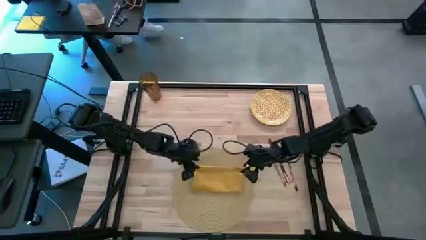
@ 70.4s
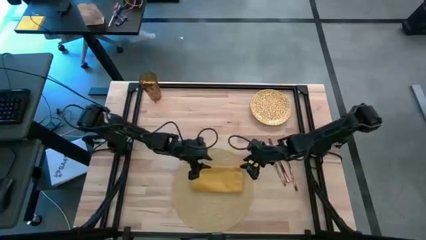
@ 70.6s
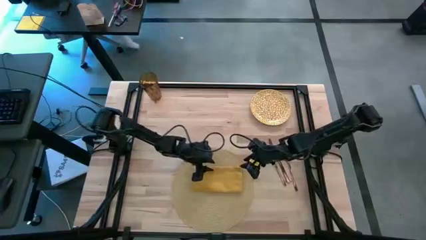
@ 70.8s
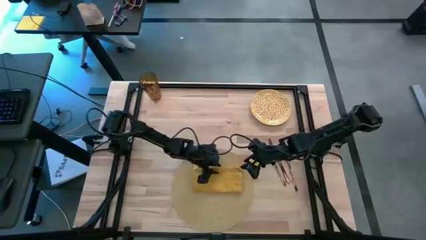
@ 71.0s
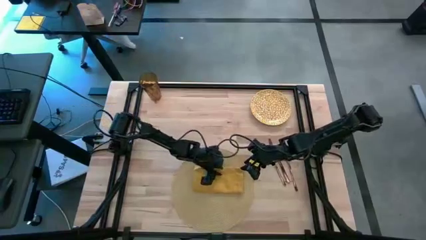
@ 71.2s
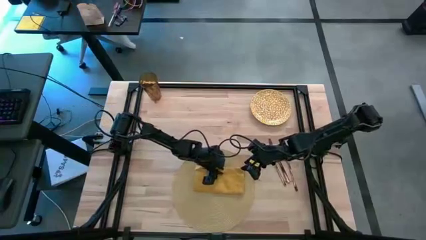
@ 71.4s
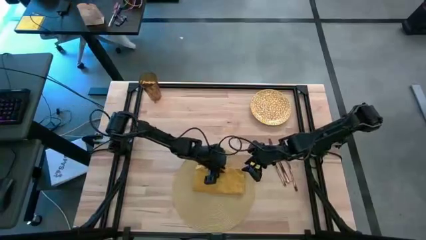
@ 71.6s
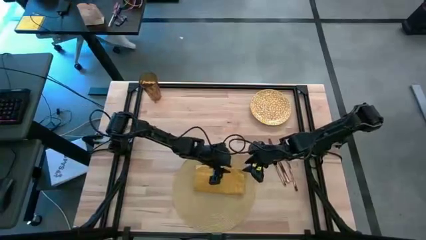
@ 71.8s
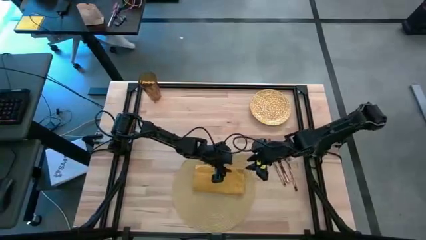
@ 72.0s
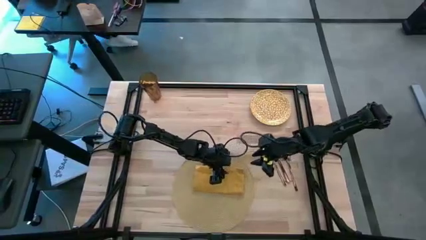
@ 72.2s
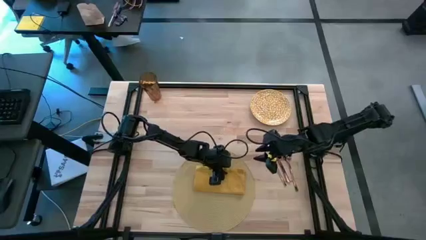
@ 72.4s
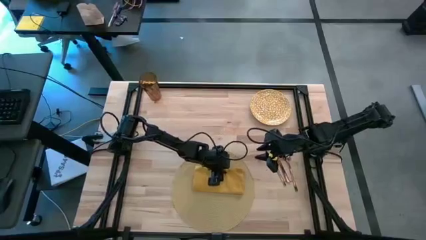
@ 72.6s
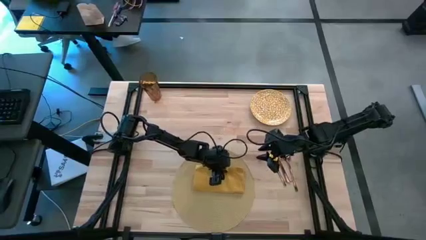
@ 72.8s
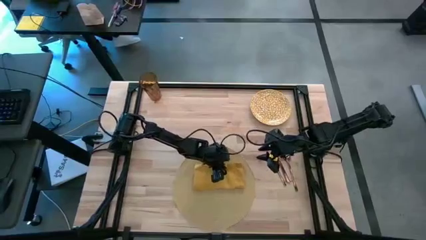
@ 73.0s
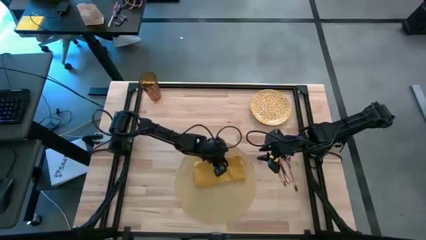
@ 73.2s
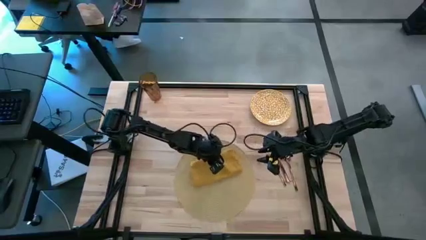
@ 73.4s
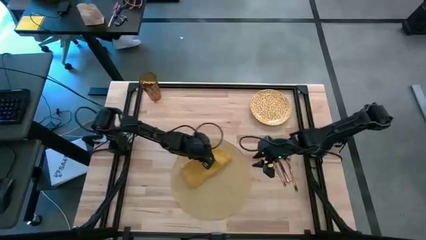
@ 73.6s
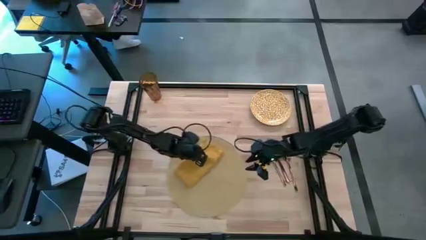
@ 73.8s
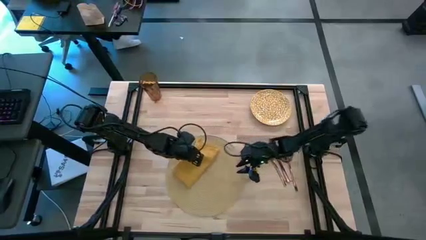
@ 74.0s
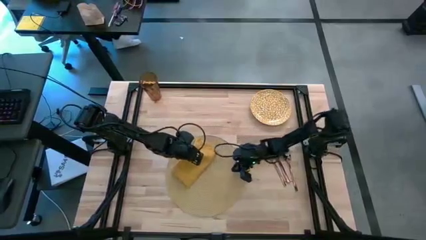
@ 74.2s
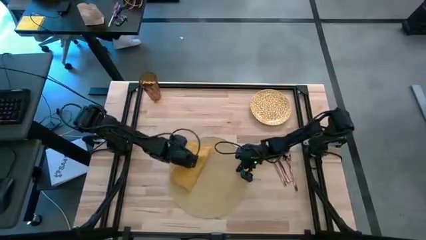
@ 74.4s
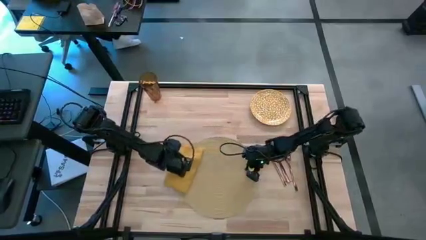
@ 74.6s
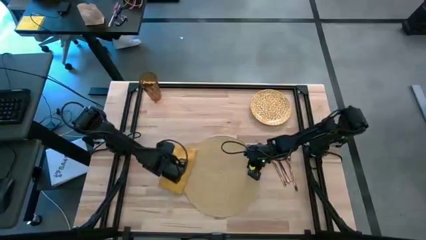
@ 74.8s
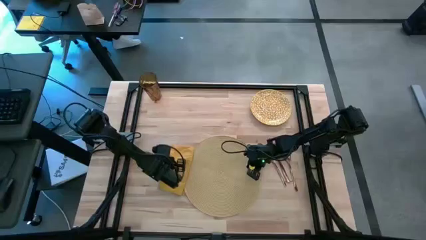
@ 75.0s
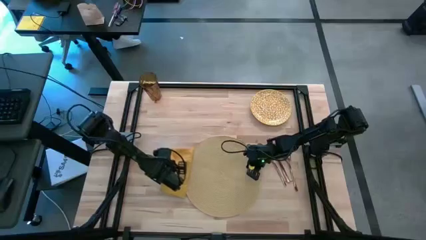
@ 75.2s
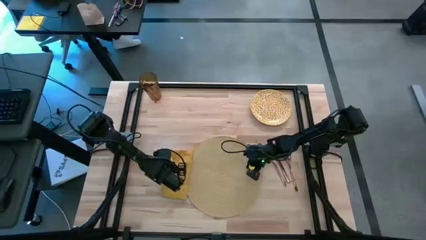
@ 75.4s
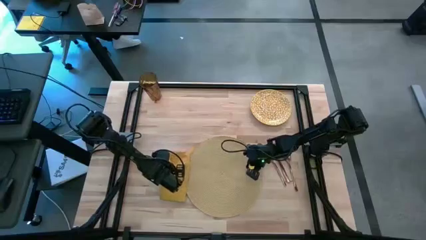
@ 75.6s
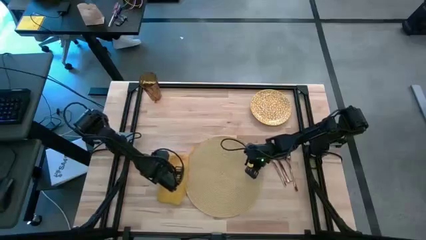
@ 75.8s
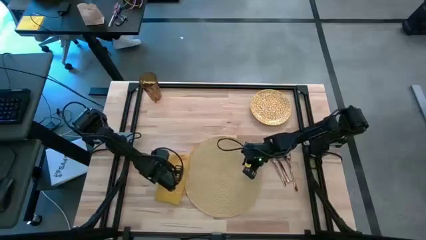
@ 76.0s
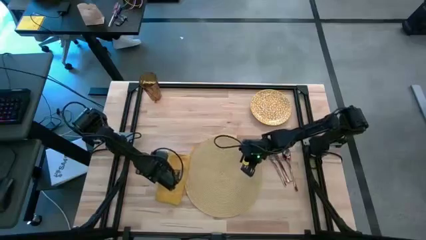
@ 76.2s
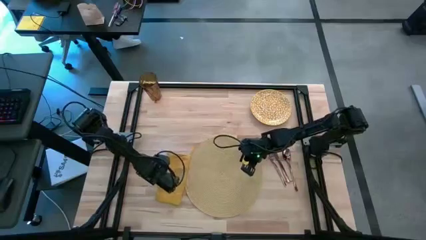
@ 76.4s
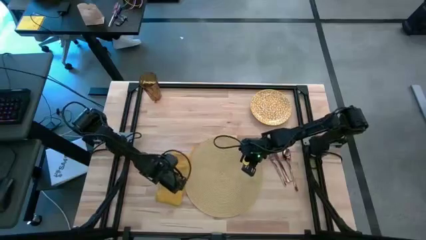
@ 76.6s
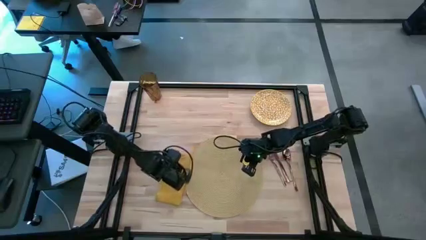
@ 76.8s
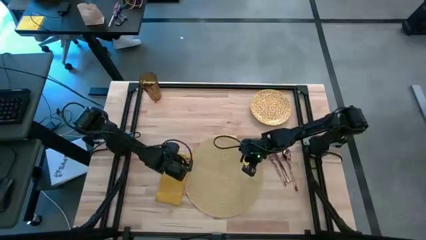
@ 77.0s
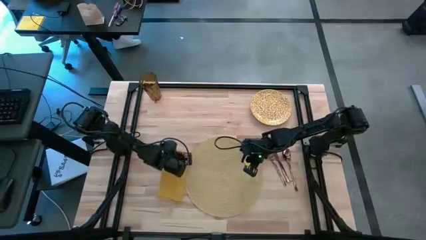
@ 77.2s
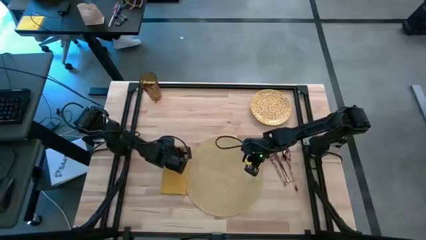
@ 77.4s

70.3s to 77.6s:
Task: Set table place
Put the yellow table napkin to the left of the tablemat

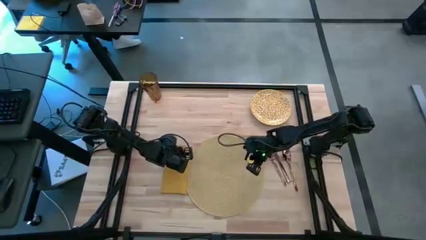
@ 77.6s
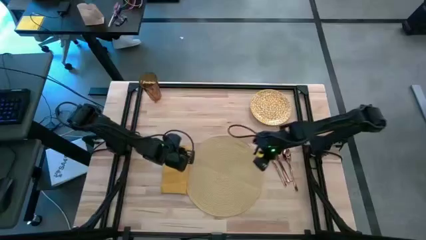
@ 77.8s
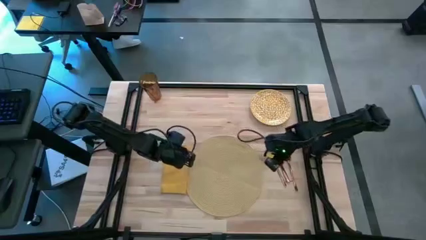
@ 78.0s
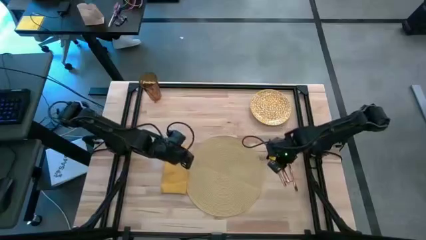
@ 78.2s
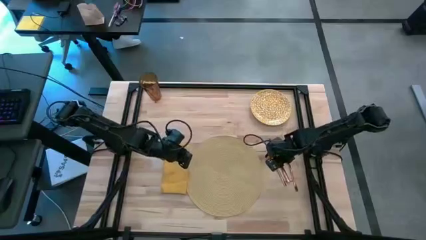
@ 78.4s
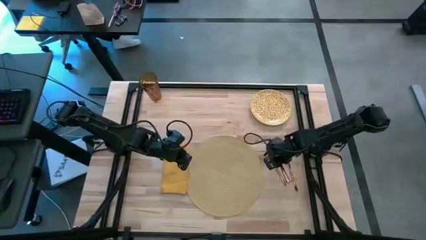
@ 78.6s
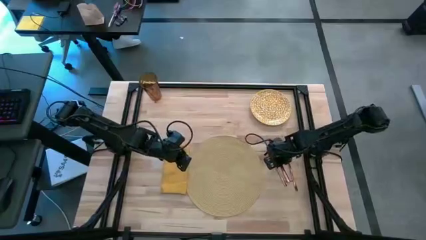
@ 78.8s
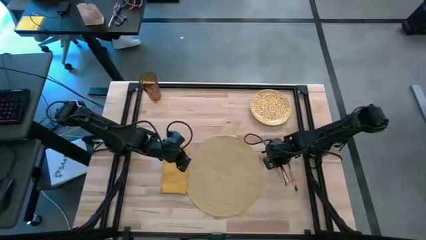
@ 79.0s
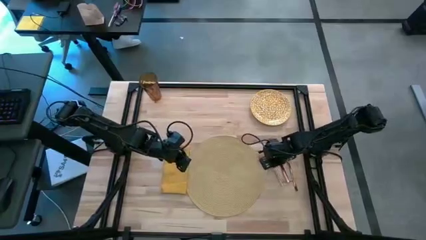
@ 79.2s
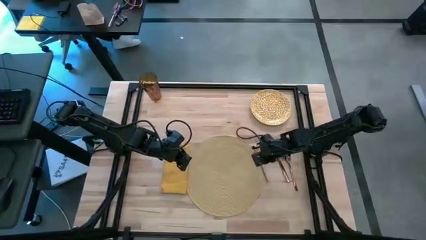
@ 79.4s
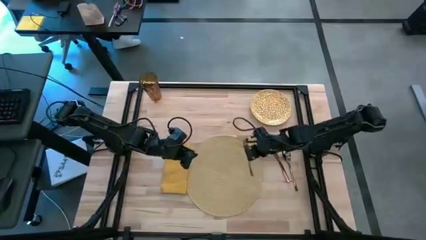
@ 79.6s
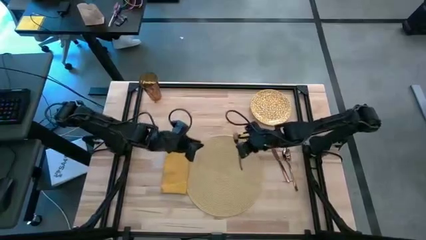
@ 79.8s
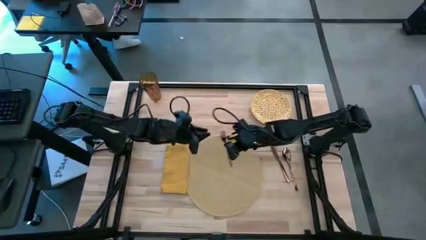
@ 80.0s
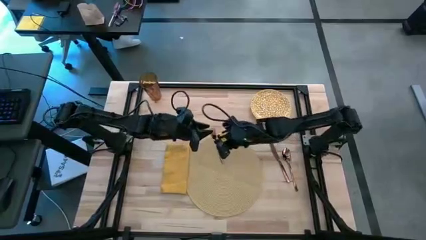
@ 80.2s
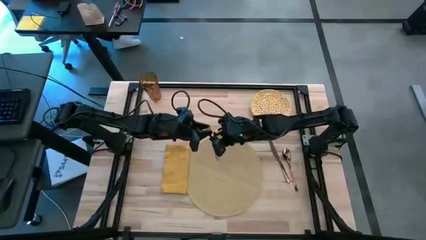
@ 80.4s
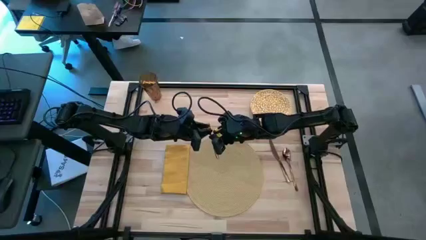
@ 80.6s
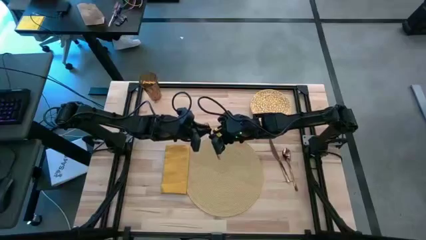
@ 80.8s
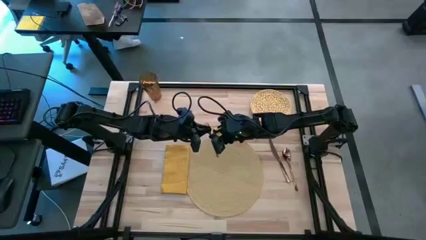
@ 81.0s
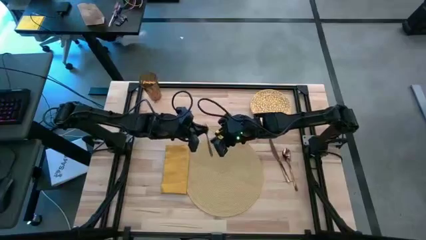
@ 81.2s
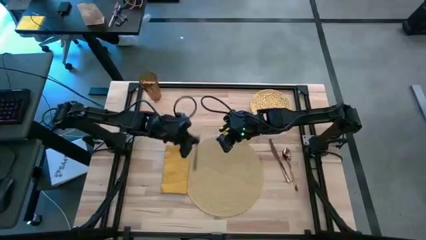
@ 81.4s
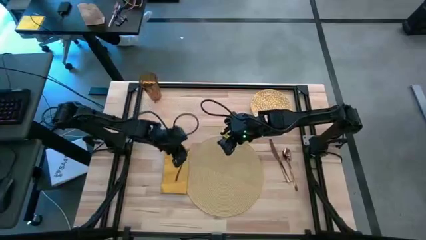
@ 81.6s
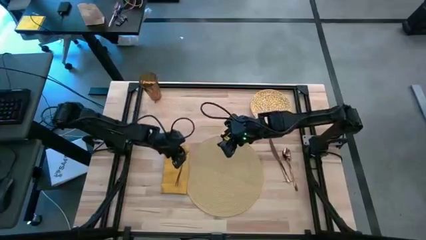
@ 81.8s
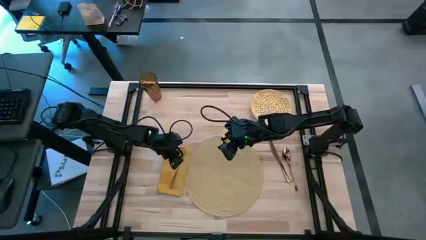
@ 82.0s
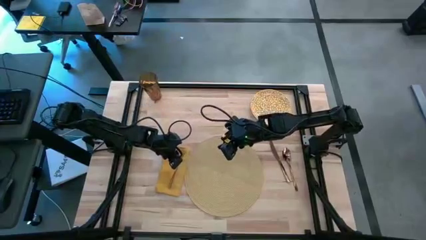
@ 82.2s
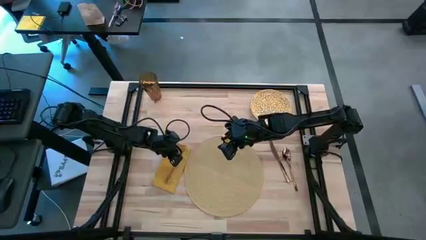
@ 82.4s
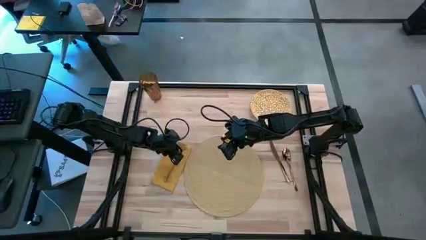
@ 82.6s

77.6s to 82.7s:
Put the light brown fork on the yellow table napkin

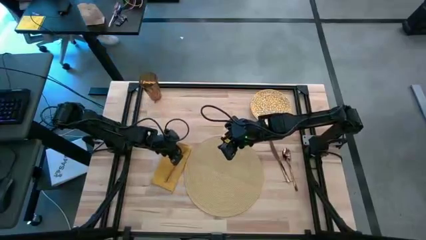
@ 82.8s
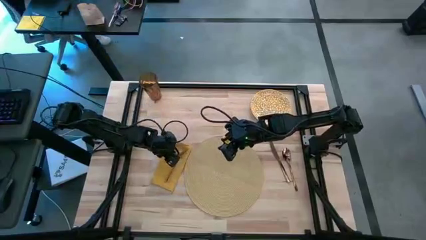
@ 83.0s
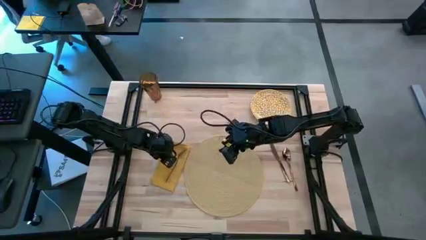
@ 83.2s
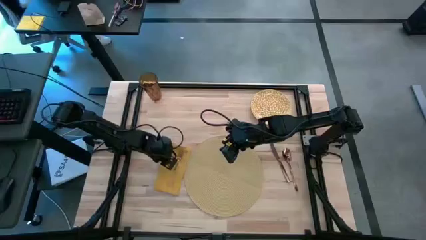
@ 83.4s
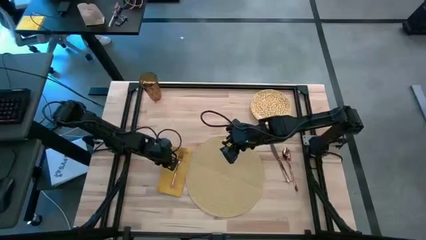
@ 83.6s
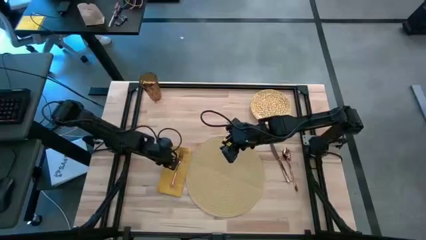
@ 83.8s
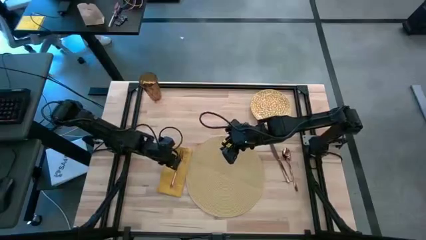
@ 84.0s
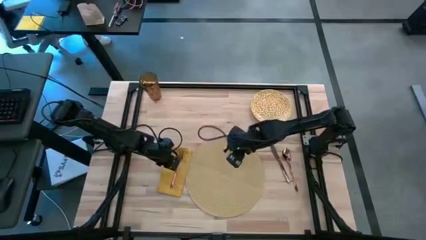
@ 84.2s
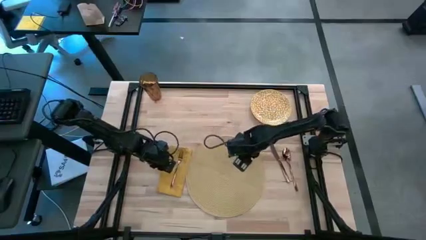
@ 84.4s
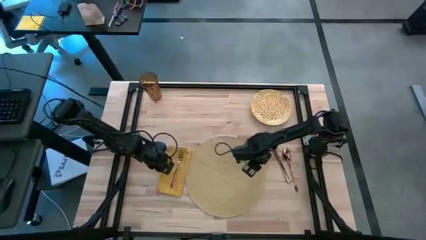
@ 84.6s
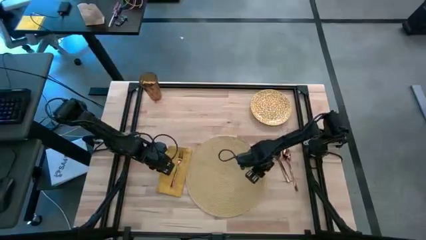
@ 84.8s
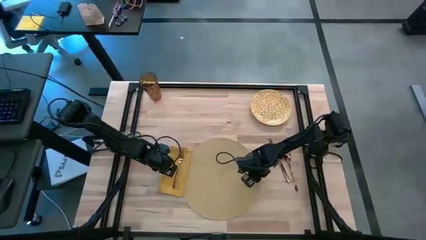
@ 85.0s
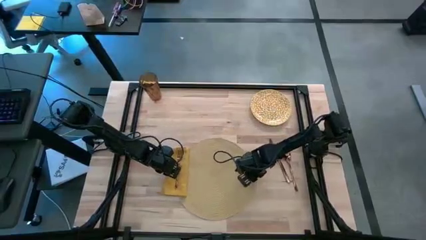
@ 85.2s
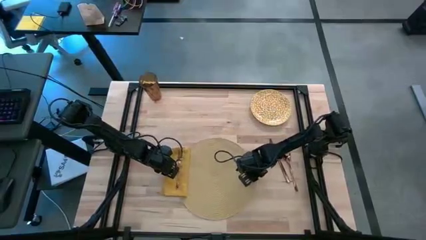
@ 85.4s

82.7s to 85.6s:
Adjust the table napkin and tablemat
